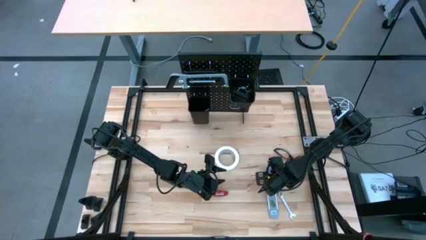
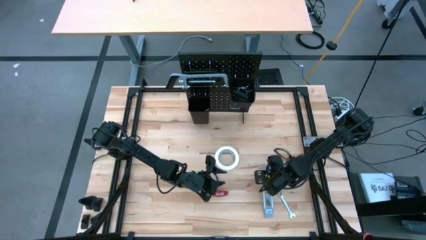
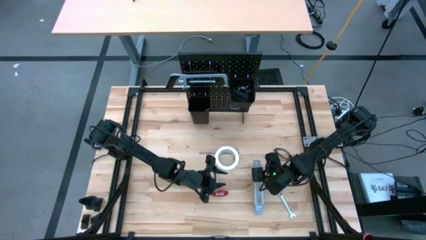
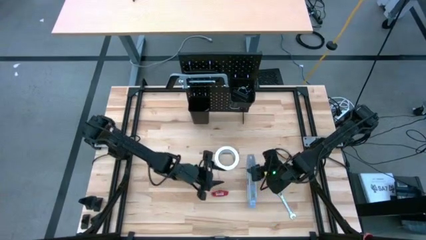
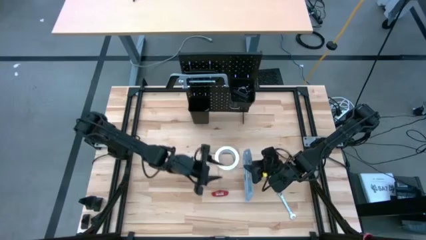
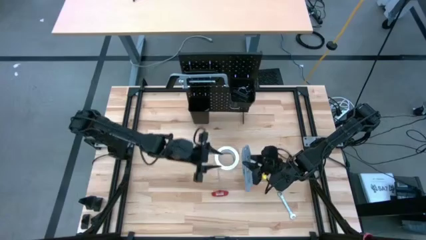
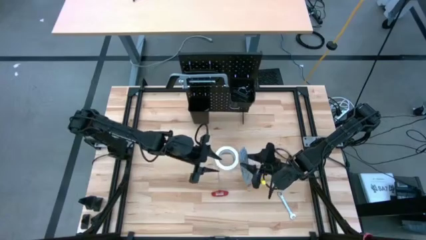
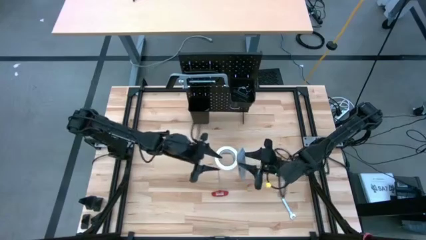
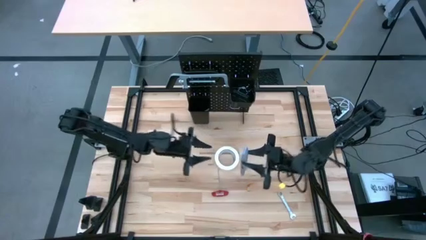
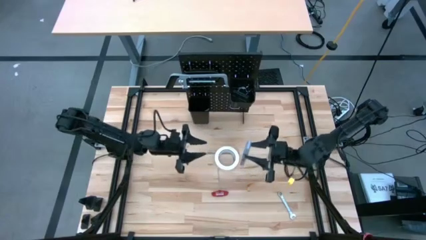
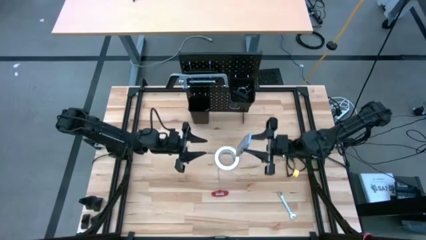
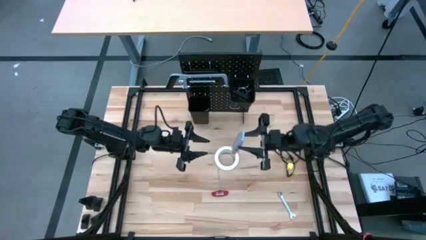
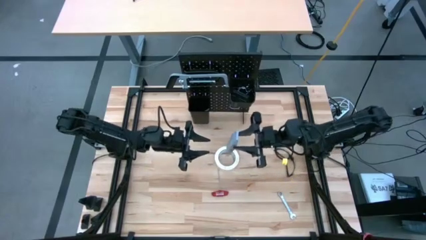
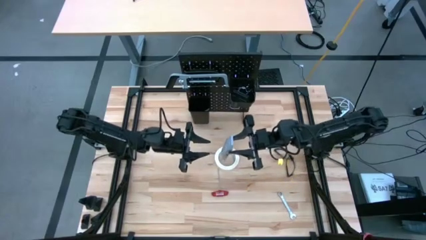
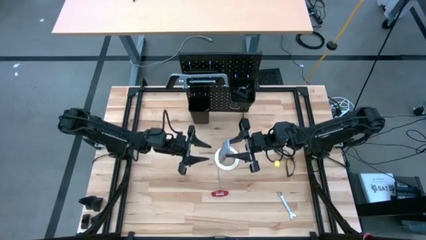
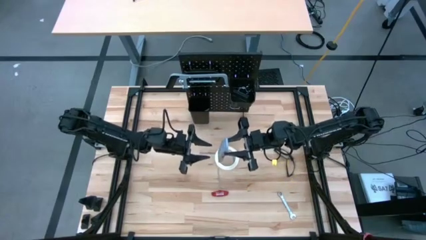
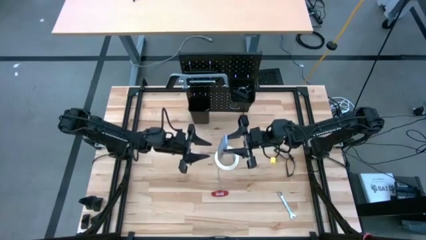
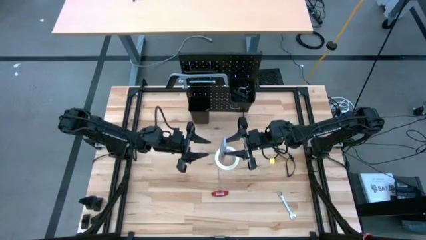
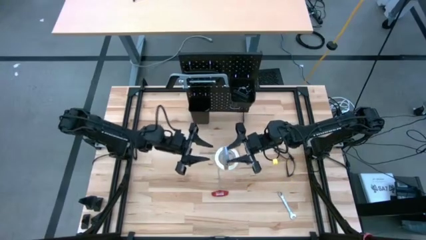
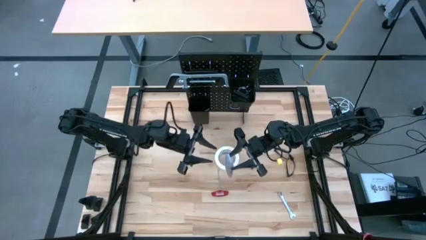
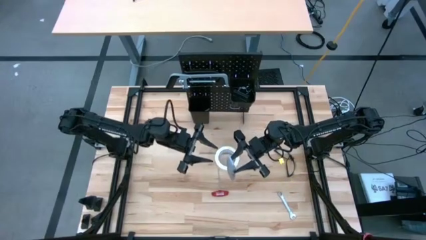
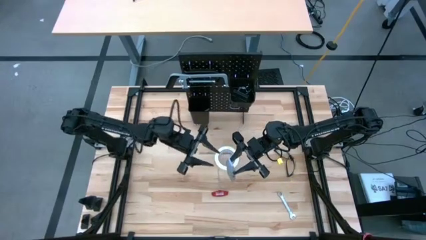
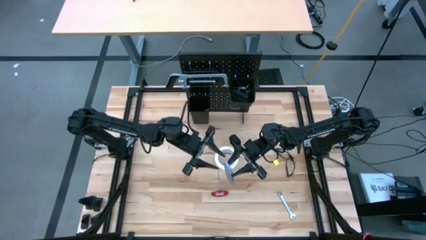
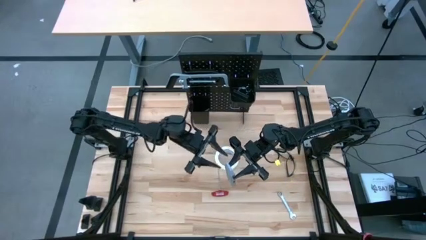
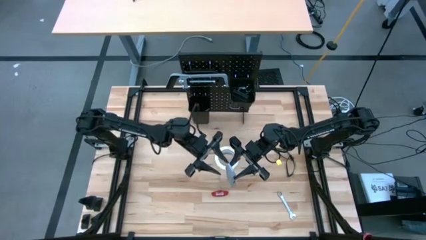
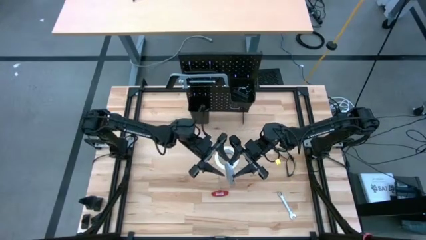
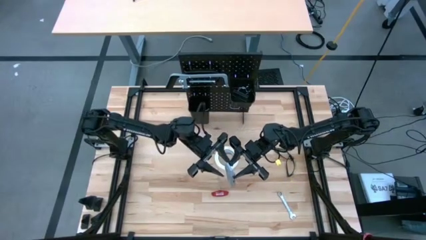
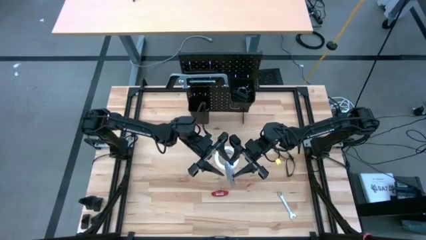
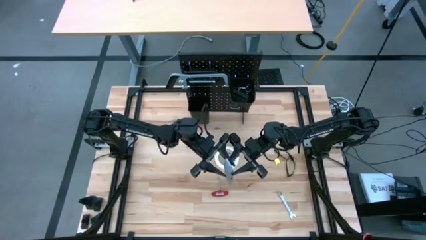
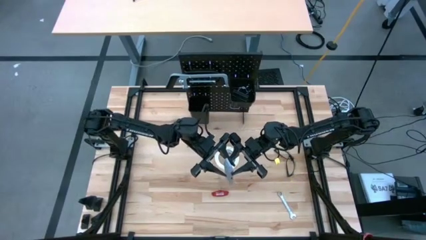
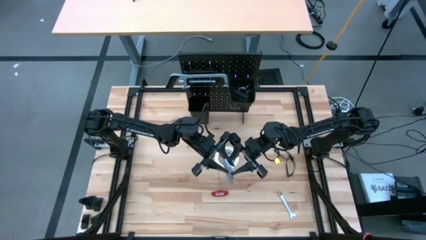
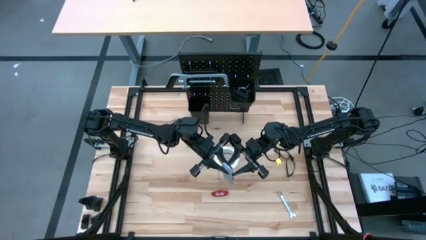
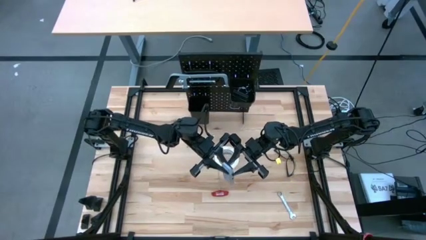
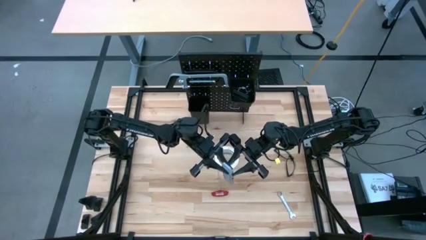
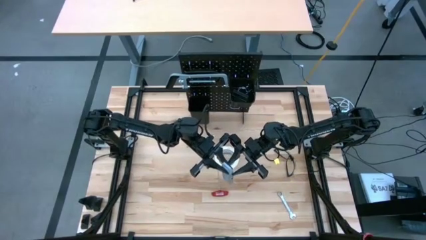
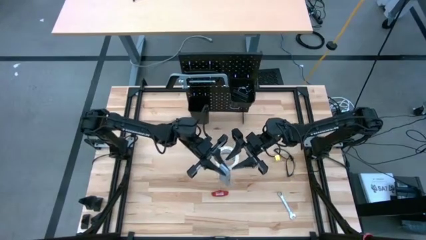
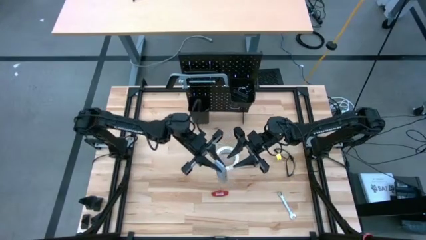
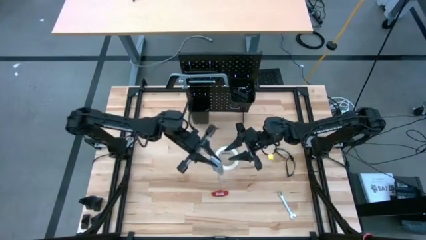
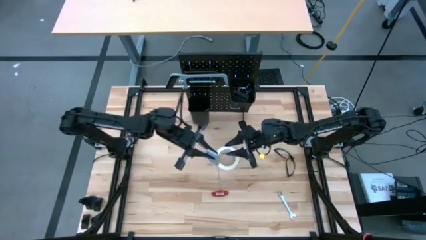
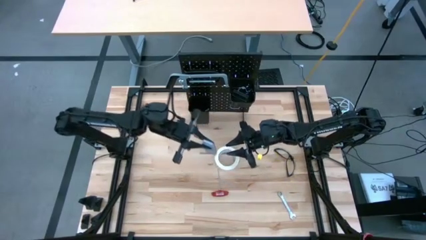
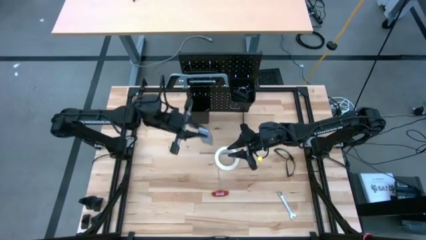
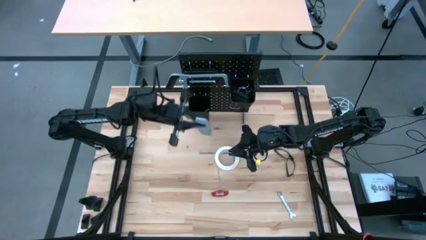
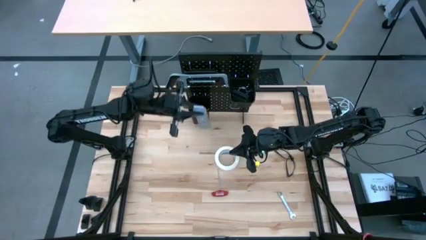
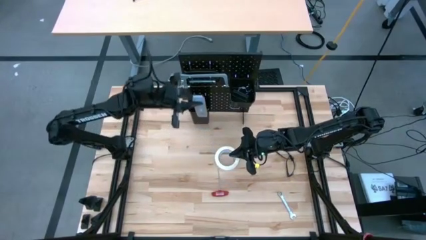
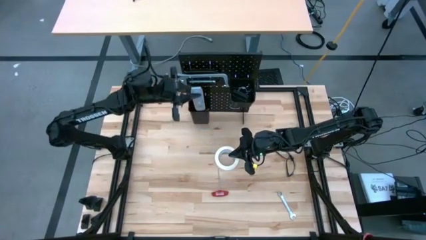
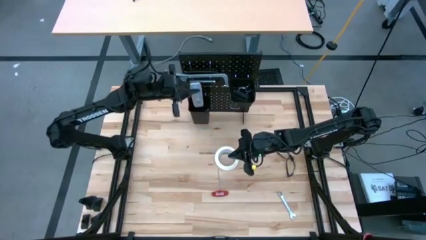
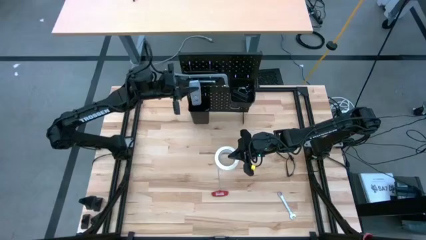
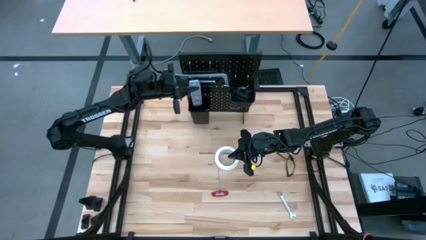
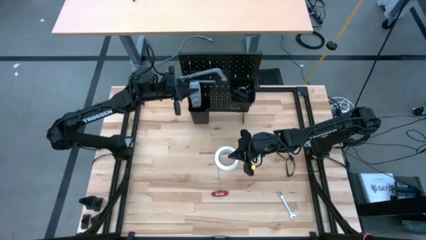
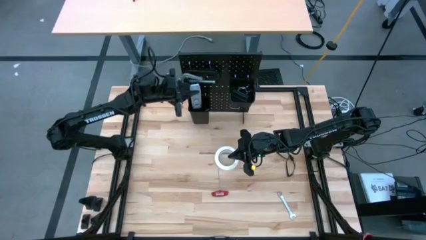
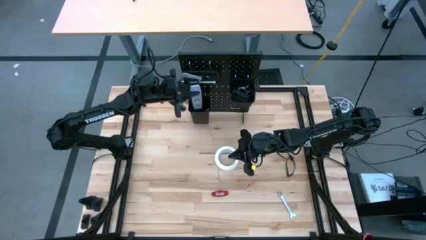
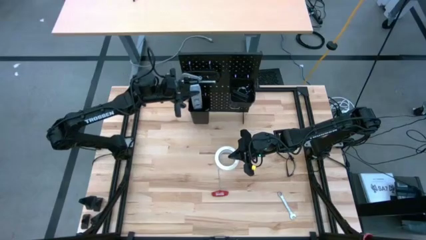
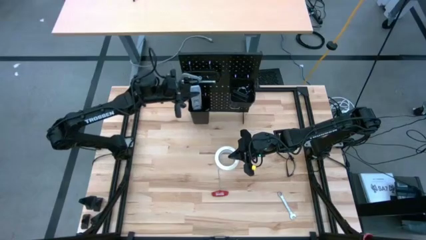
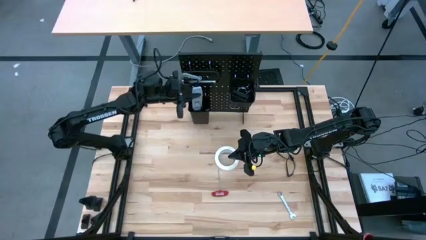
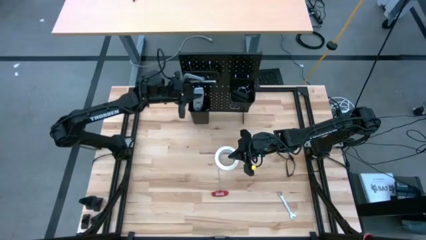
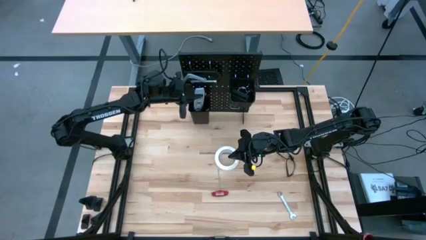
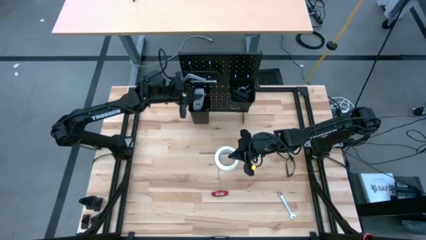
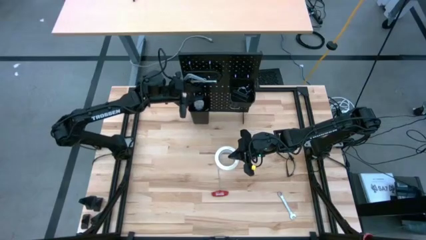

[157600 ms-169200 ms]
Task: Hang tools onto peg board
Put the gray level into the left black tool bin

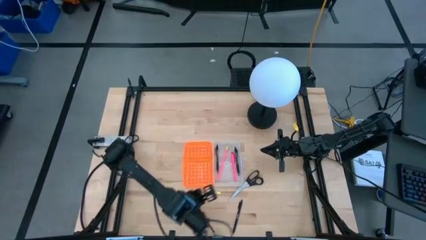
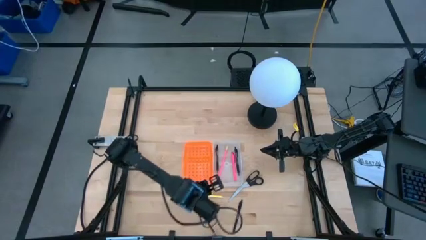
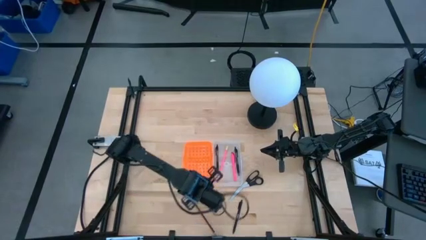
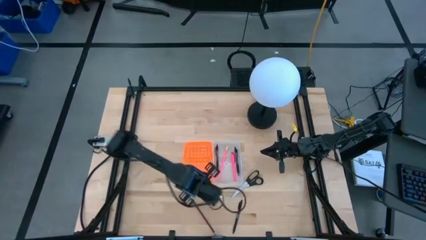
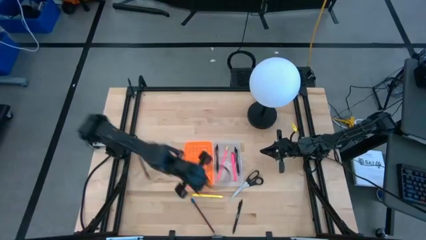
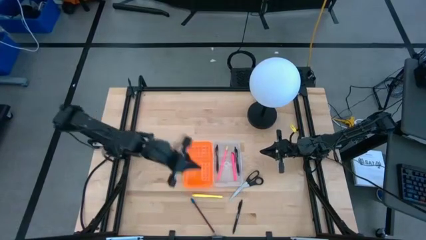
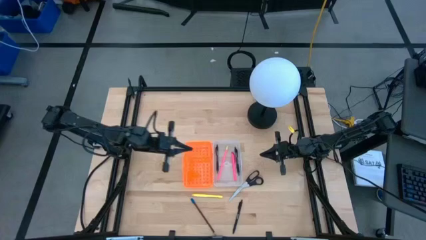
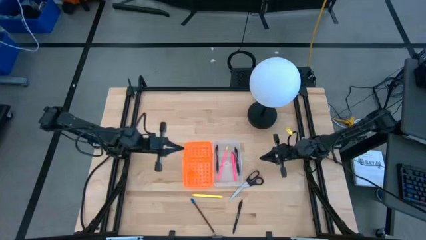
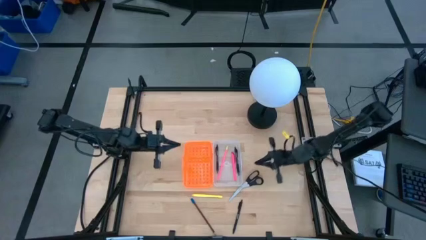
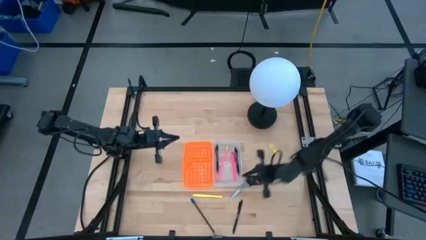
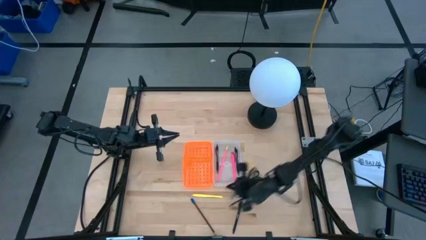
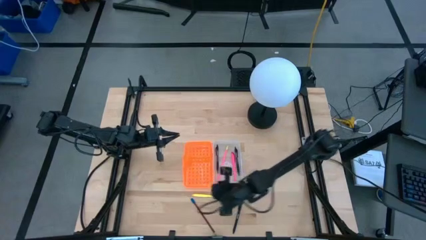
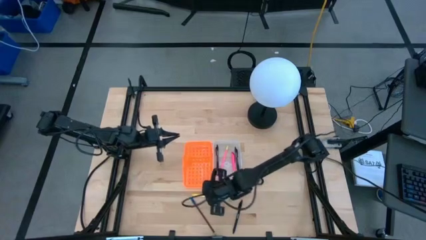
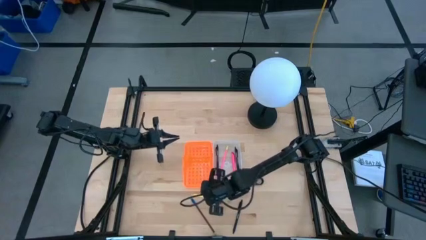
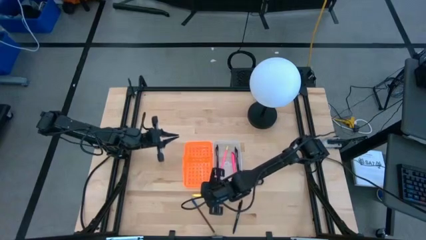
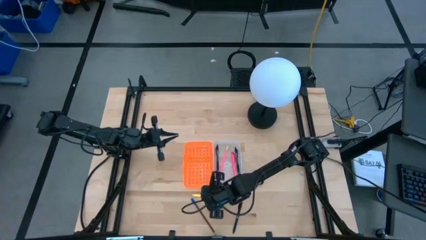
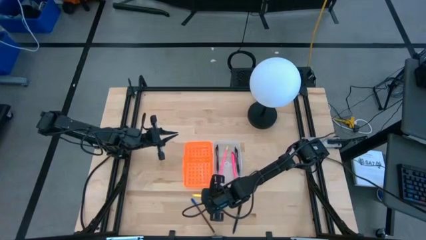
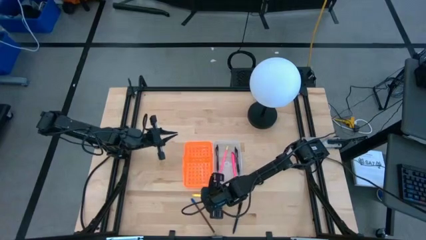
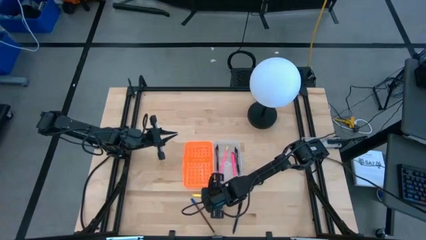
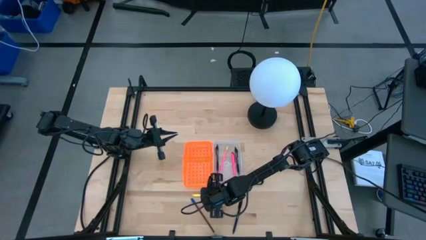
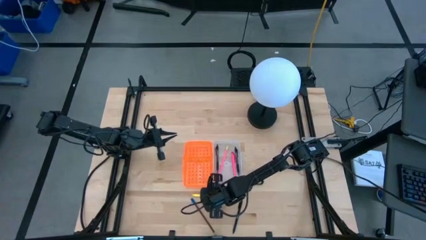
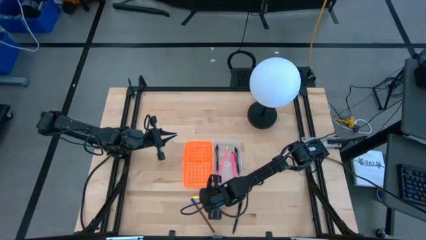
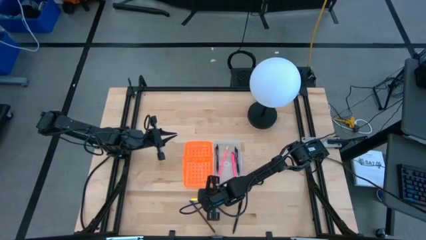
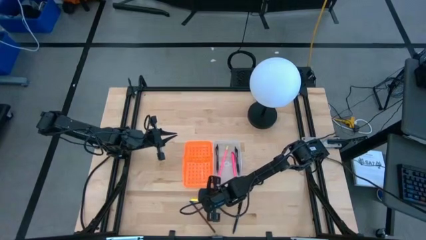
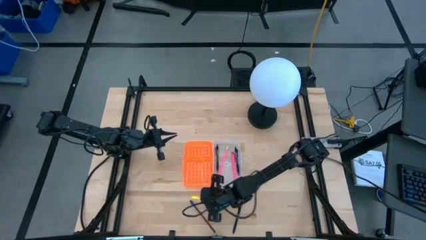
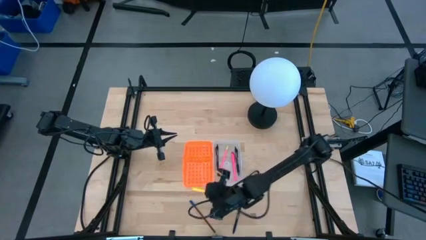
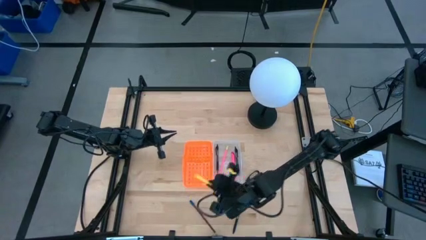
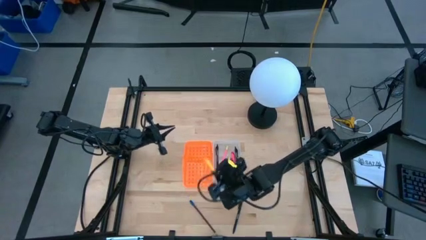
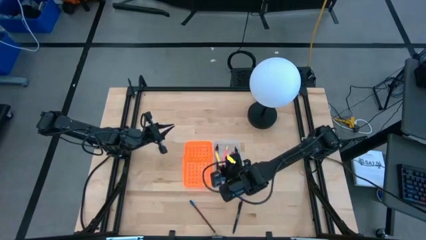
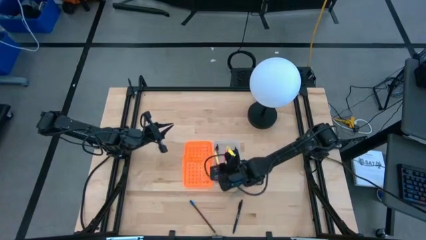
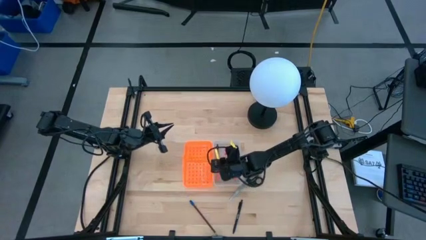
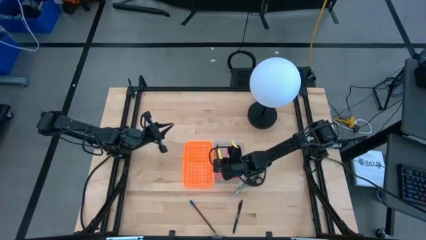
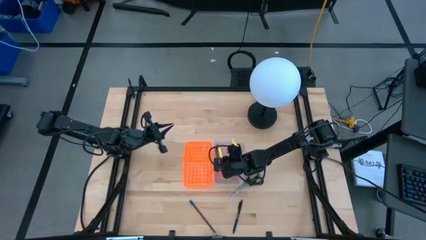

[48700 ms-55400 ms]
Task: Pick & place school supplies into a supply box
Put the yellow highlighter into the orange supply box
